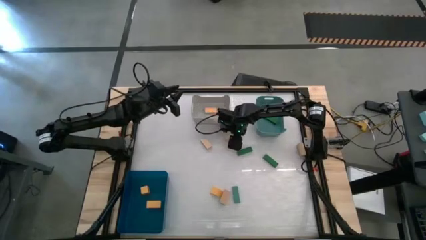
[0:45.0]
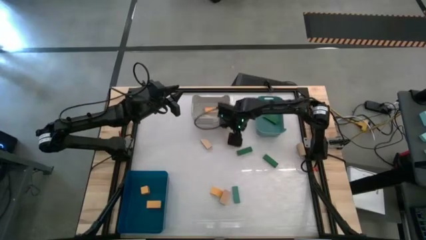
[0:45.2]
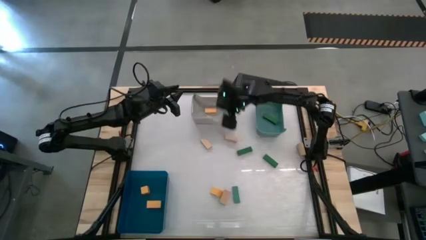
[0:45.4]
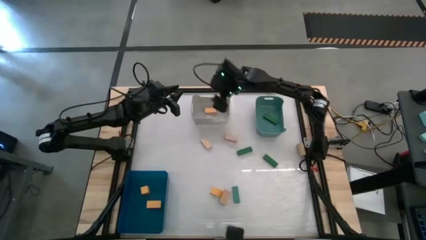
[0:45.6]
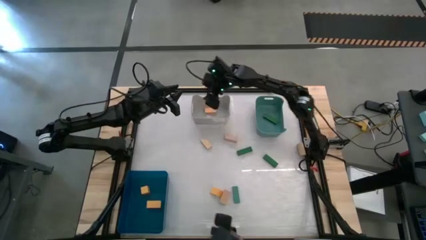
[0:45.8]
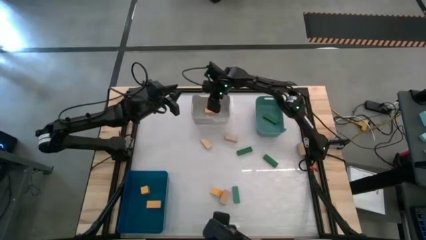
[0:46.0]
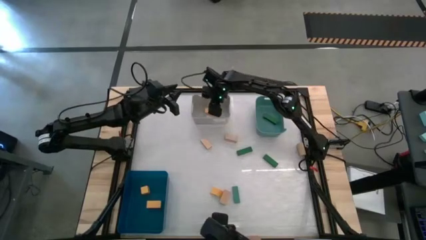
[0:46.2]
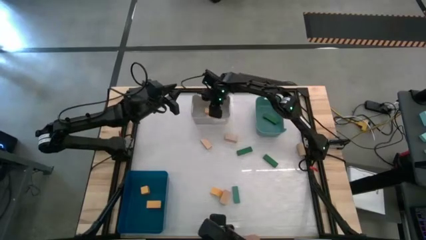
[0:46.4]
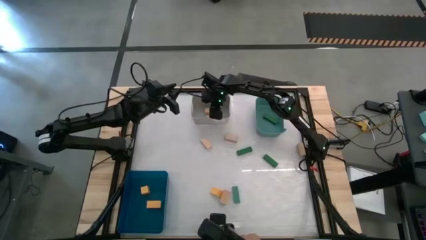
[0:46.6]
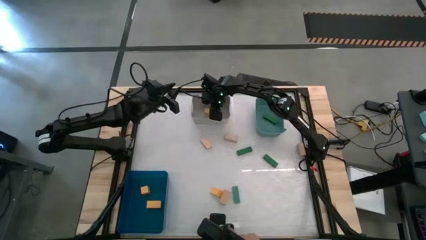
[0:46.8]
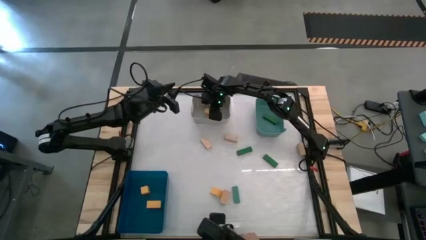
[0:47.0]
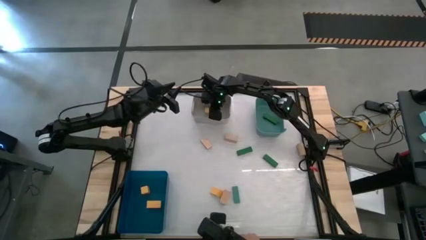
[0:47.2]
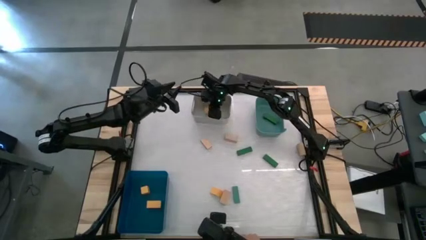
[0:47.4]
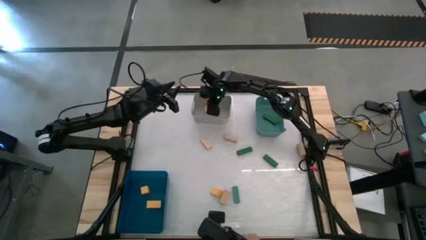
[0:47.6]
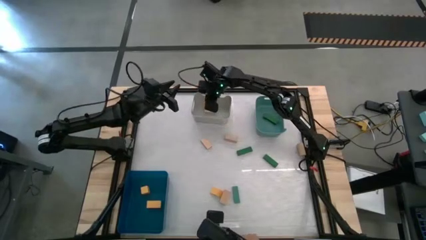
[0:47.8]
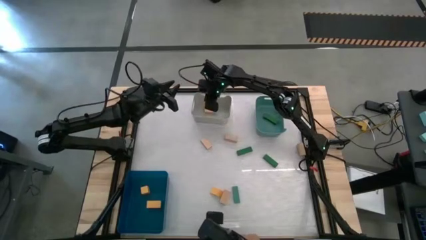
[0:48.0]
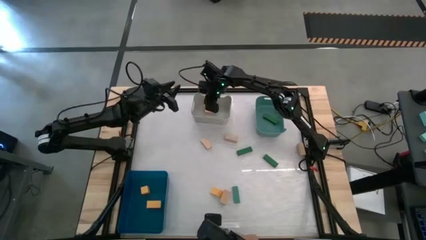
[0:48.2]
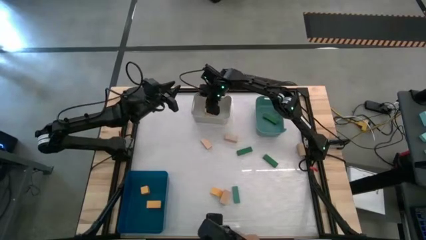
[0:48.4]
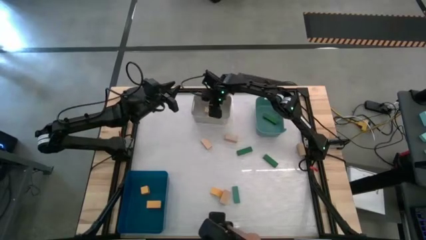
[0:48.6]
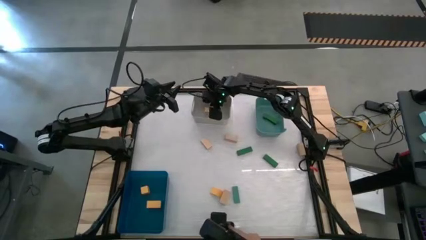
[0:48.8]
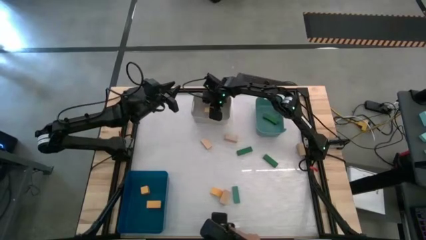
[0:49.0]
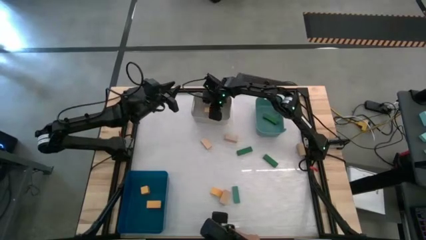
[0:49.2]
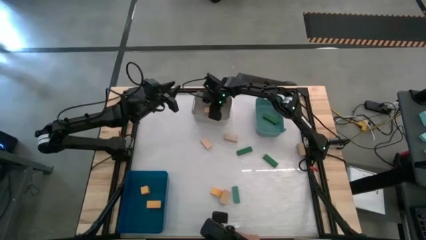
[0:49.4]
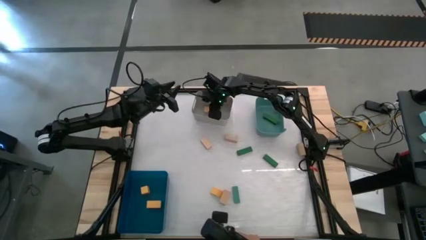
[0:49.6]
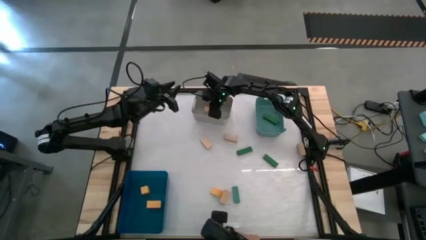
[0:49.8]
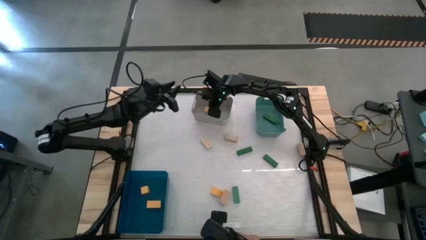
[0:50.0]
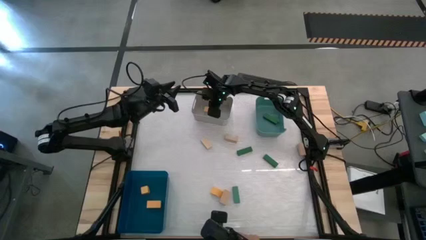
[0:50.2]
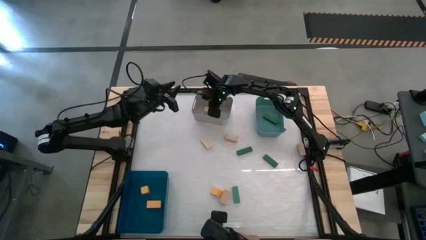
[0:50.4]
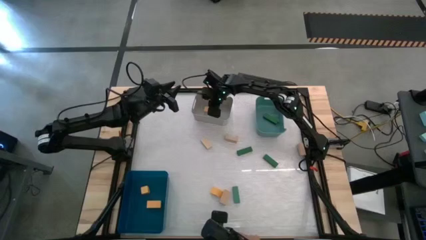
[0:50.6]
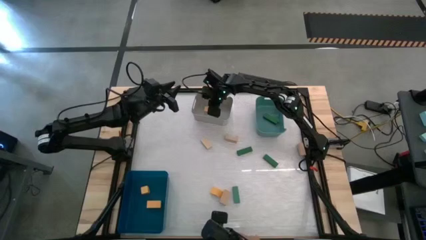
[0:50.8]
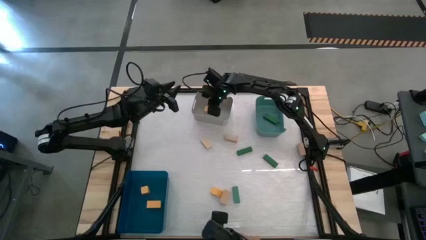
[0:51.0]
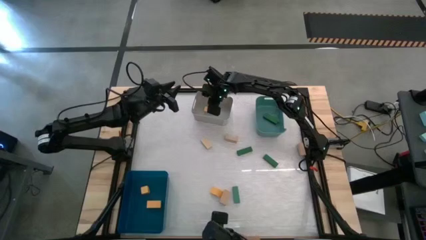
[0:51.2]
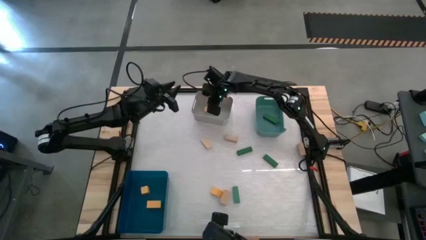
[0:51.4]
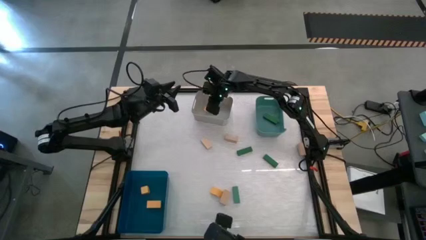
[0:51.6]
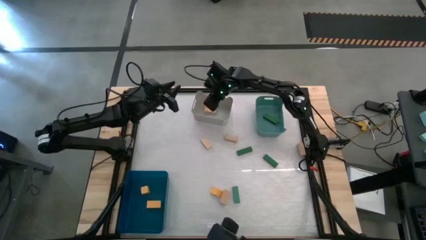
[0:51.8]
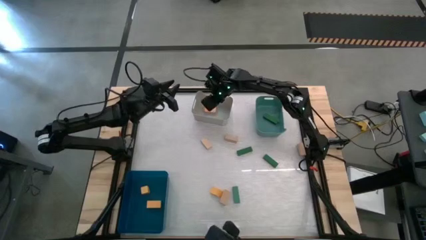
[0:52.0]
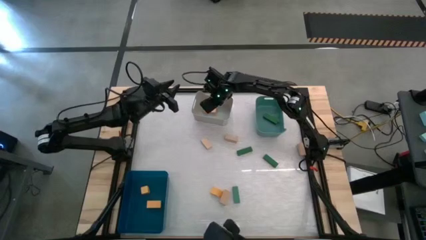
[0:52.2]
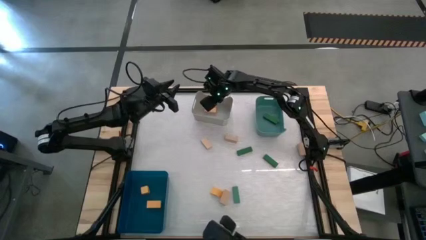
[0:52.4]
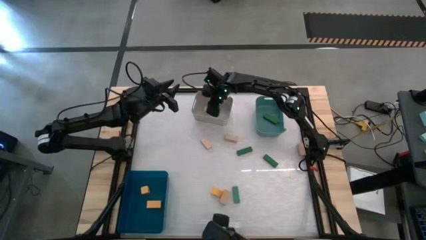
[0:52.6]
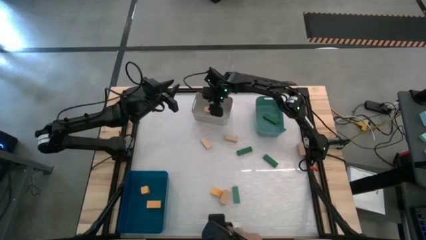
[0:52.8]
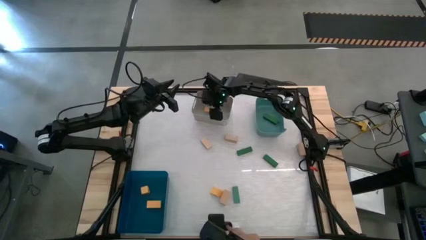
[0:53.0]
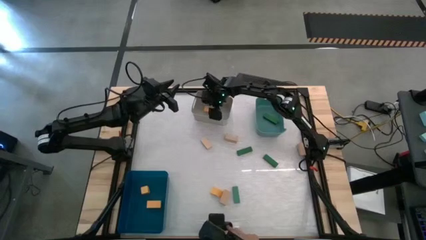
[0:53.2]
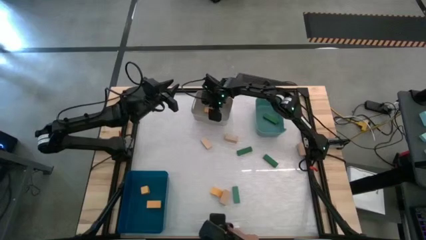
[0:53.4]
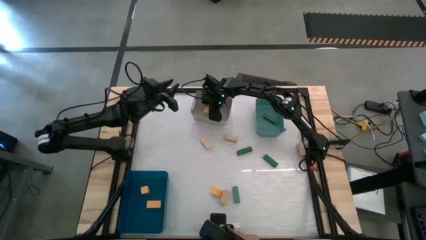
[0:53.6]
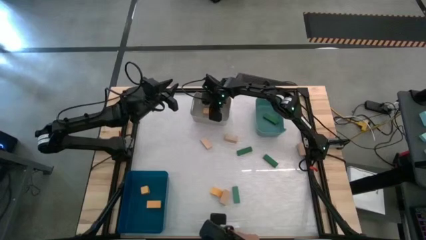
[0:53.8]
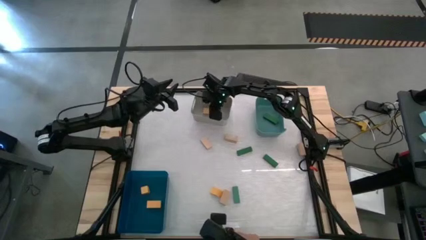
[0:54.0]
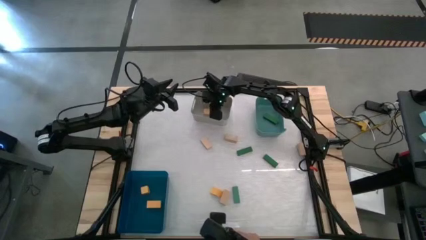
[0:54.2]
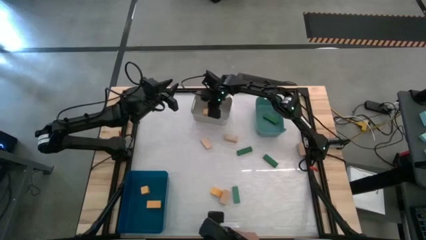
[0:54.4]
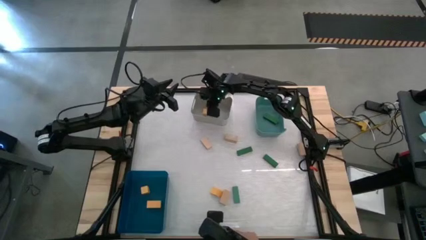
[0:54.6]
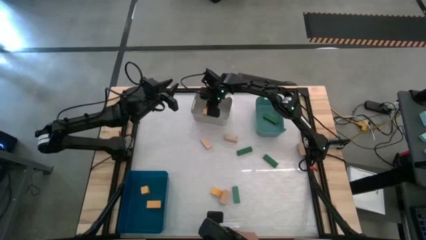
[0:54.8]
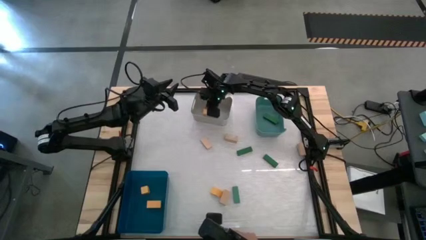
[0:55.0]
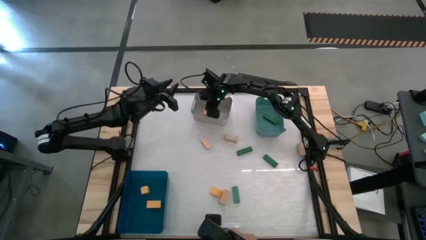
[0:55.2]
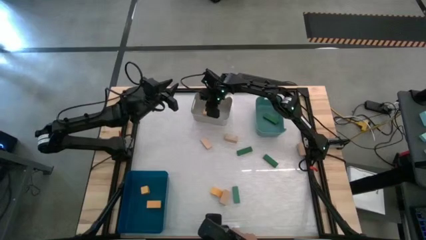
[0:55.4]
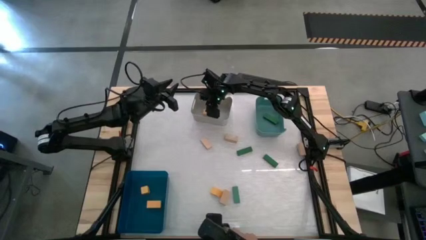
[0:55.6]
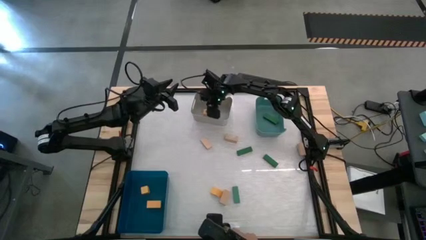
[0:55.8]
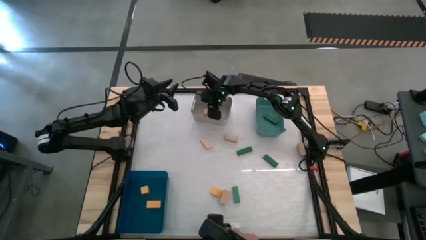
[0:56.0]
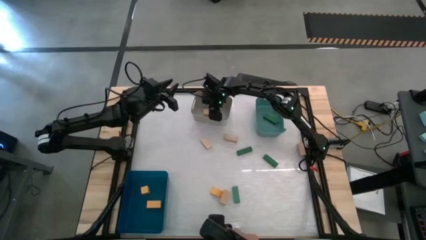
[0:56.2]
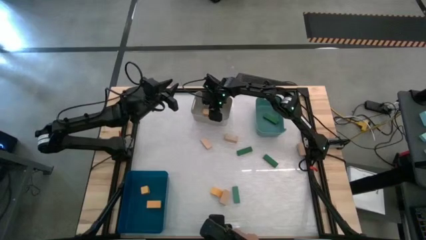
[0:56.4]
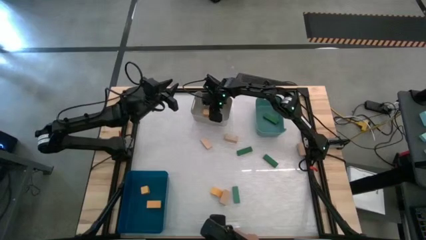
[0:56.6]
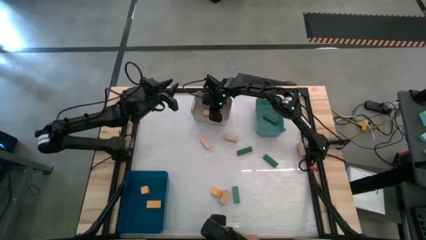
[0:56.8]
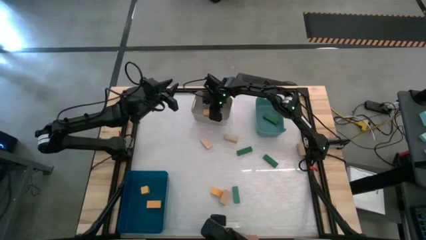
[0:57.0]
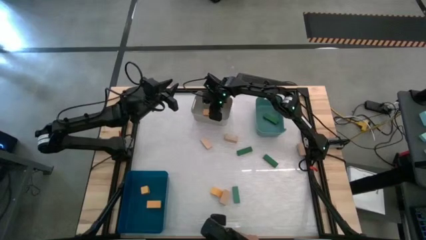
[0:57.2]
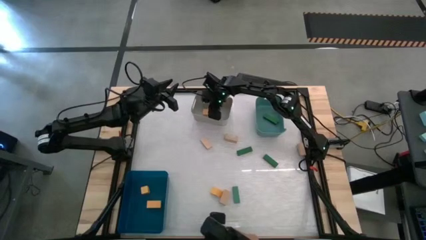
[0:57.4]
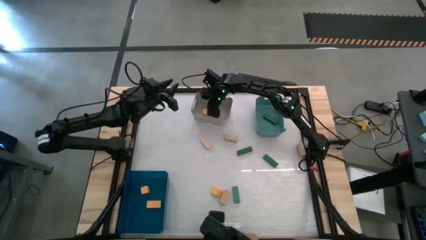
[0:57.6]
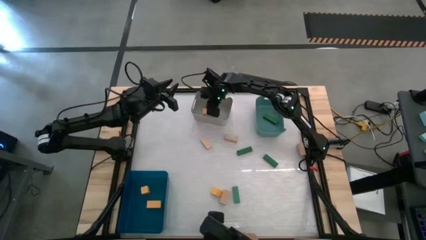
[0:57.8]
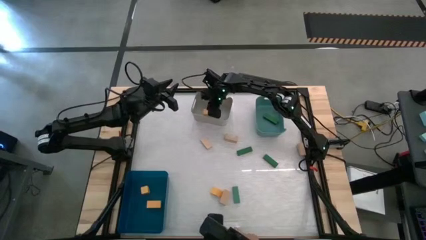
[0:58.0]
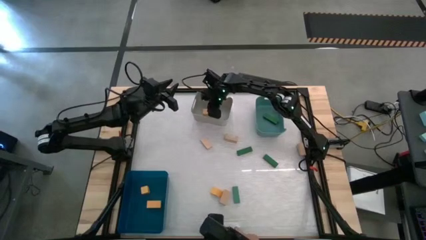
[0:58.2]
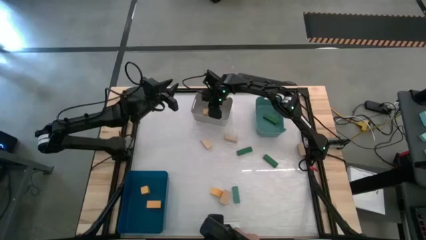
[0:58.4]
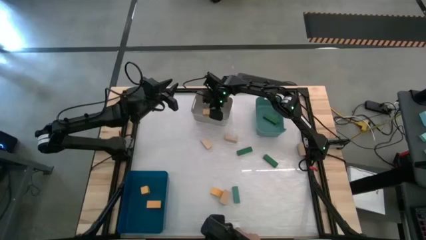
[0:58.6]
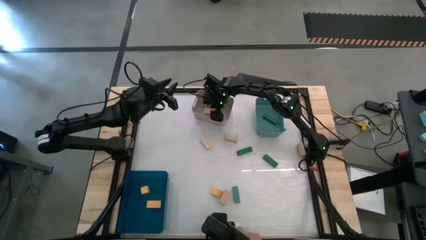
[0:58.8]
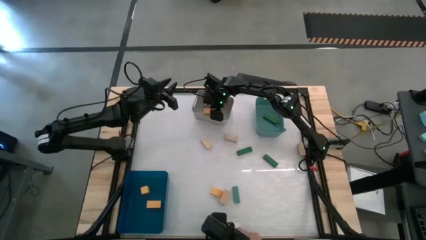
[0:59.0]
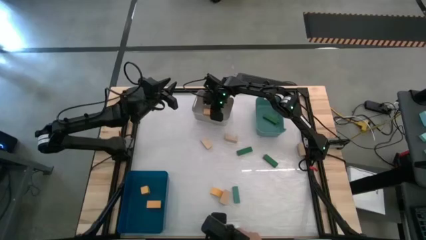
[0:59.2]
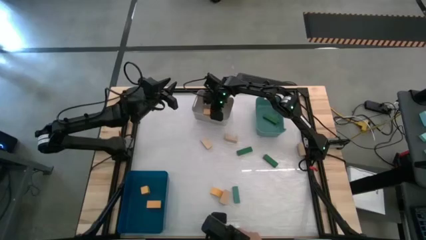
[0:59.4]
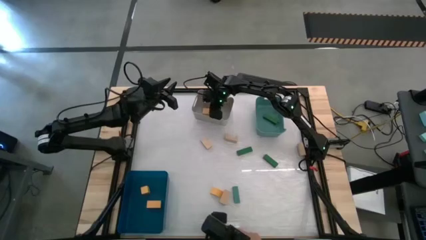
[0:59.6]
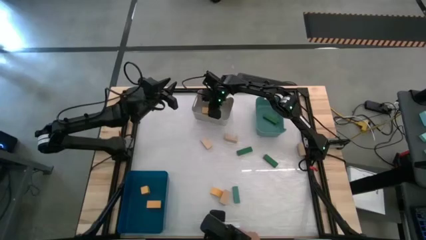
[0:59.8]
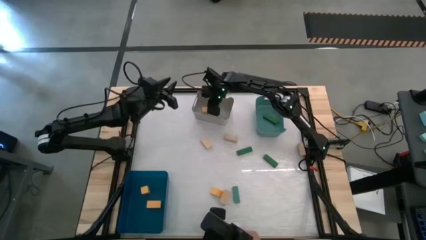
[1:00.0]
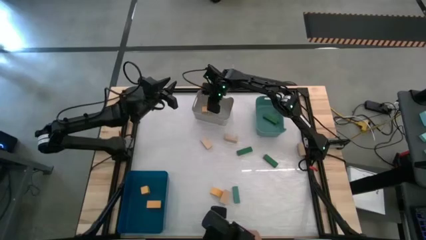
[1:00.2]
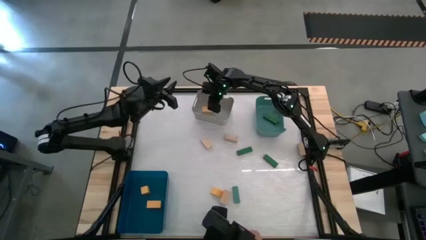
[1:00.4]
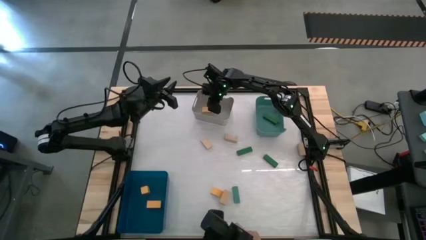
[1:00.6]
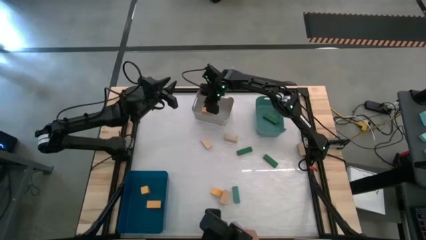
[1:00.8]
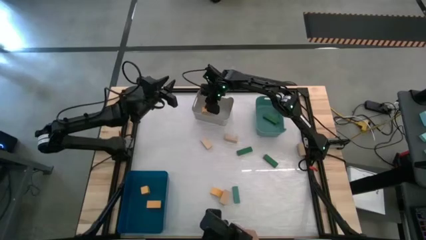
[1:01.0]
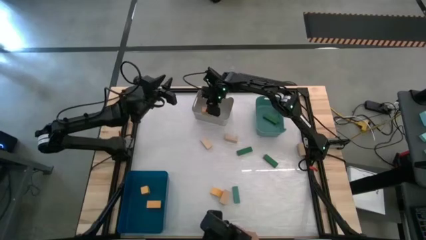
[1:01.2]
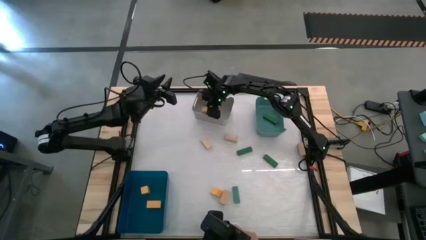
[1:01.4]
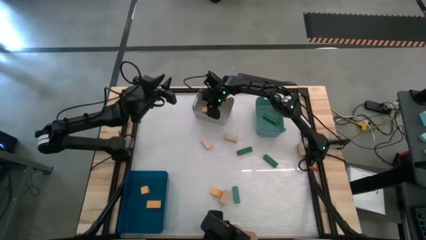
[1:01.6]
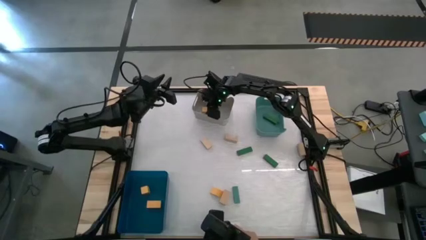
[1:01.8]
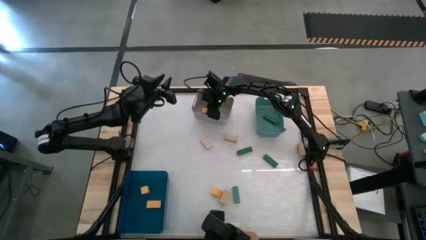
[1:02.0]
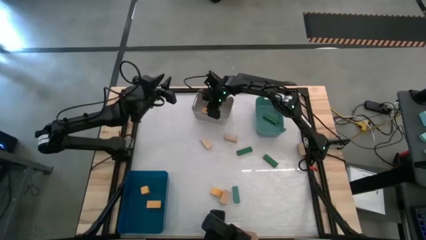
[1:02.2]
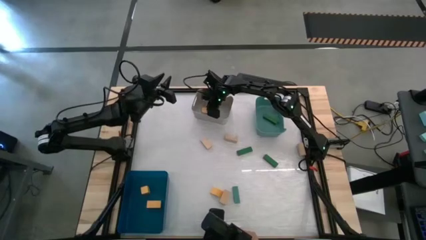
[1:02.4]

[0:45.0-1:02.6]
Task: Sort & place blocks by color
Put the yellow block into the blue bin
